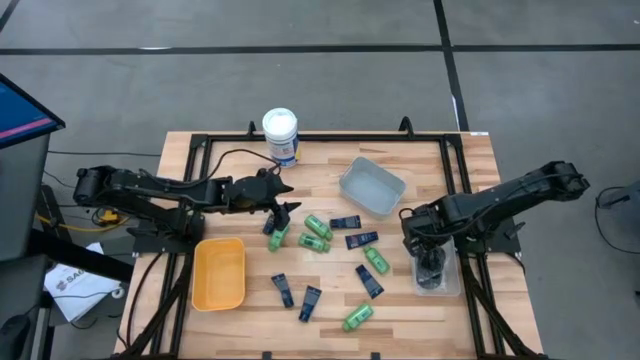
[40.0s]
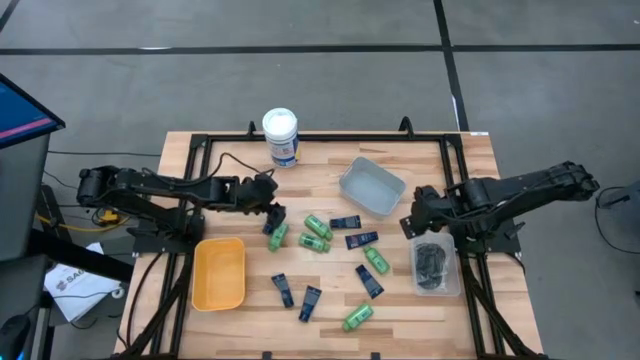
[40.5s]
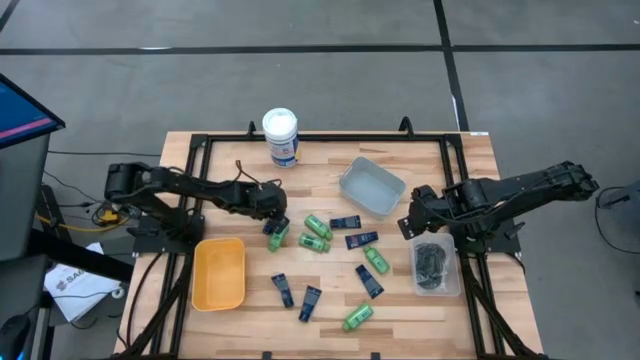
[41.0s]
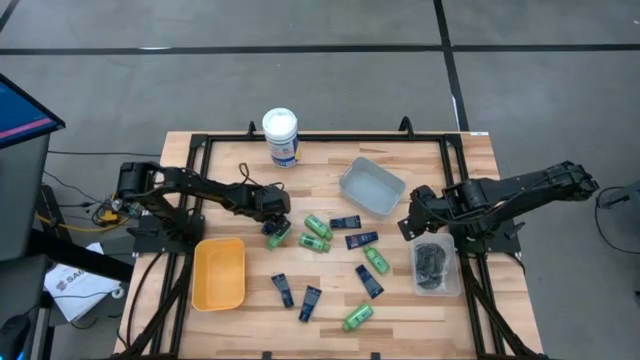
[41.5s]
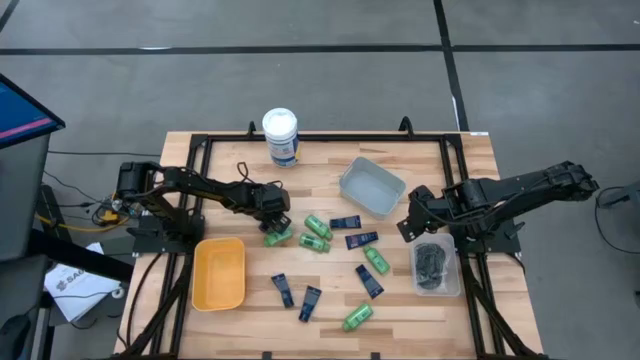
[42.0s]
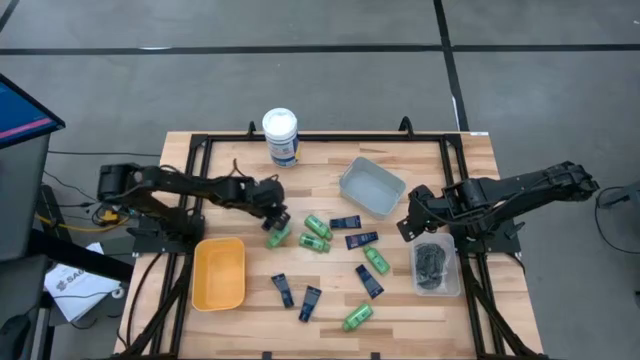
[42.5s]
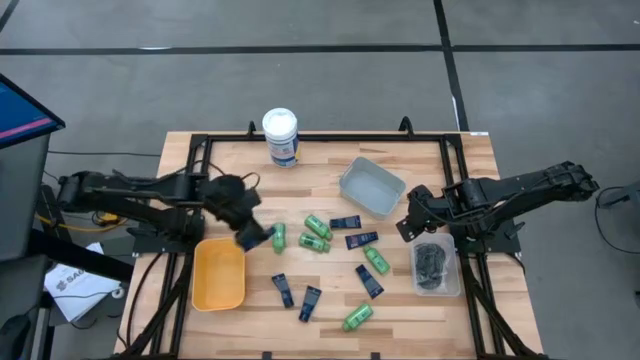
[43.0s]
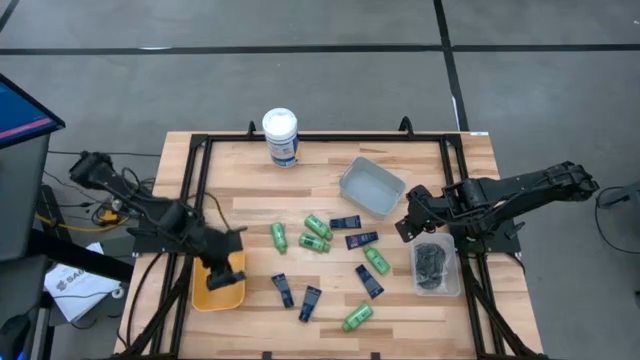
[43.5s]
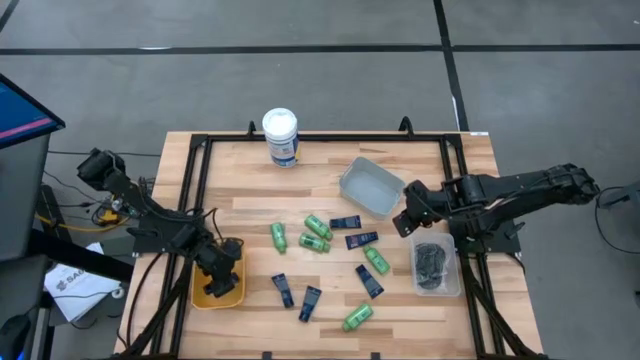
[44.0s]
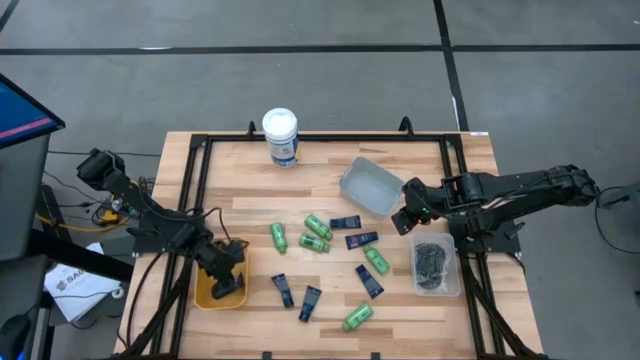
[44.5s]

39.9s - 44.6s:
Task: Pick & Place Travel size toiletries
Put the blue shave cream into the light orange bin

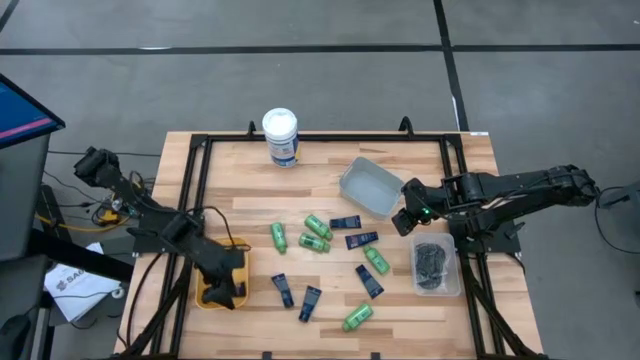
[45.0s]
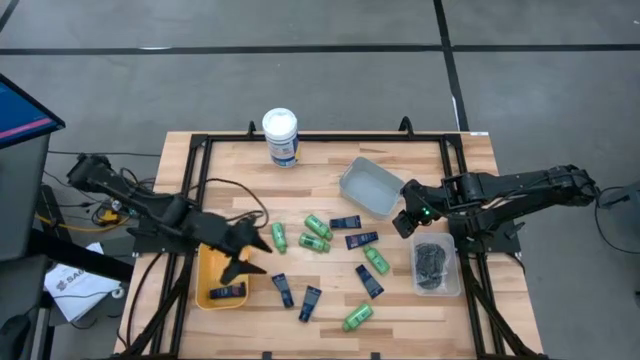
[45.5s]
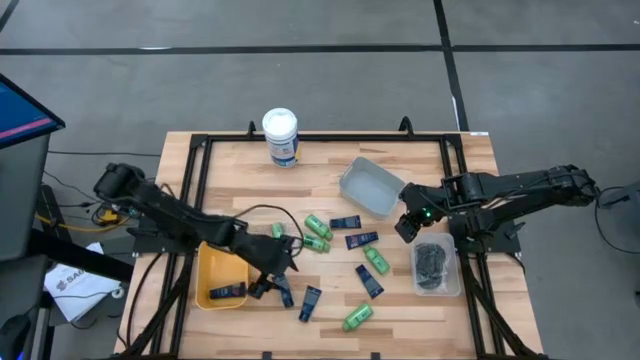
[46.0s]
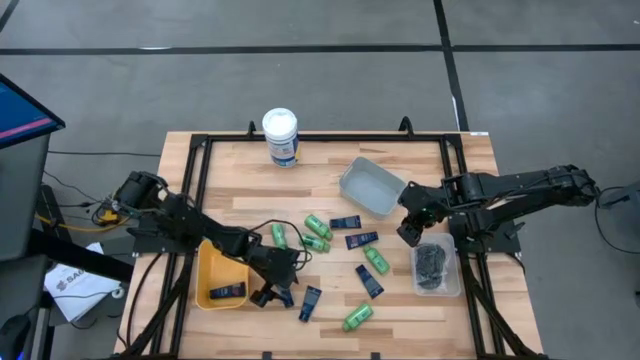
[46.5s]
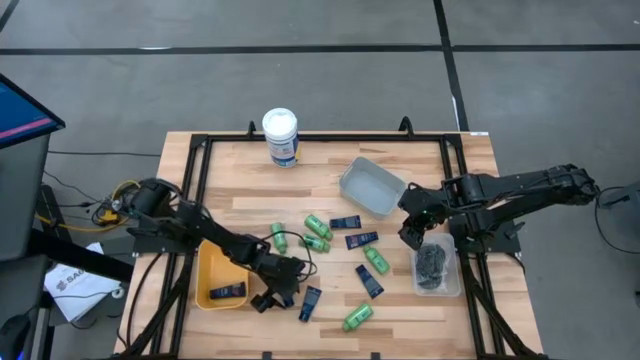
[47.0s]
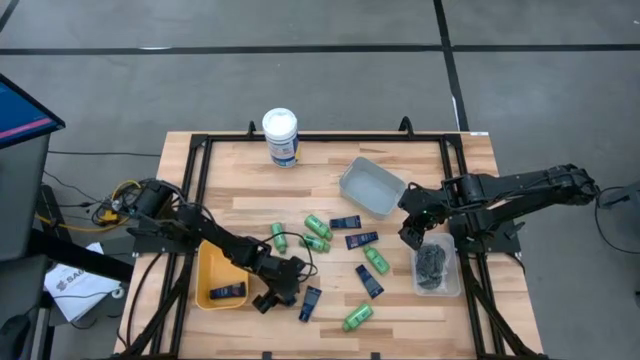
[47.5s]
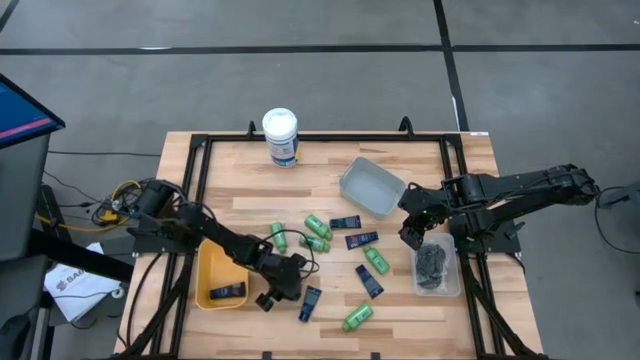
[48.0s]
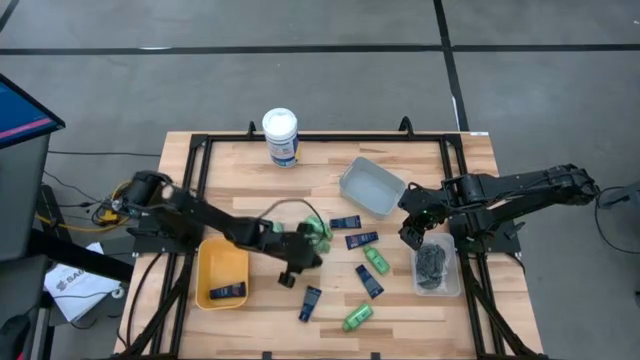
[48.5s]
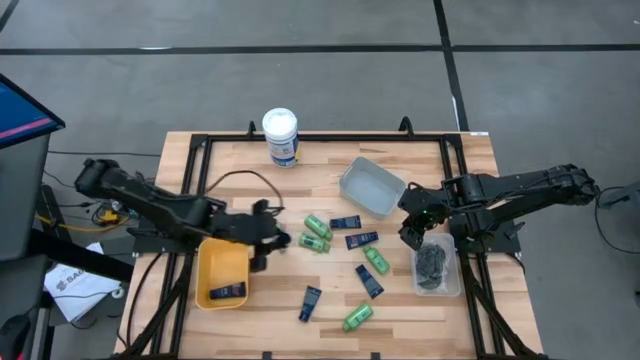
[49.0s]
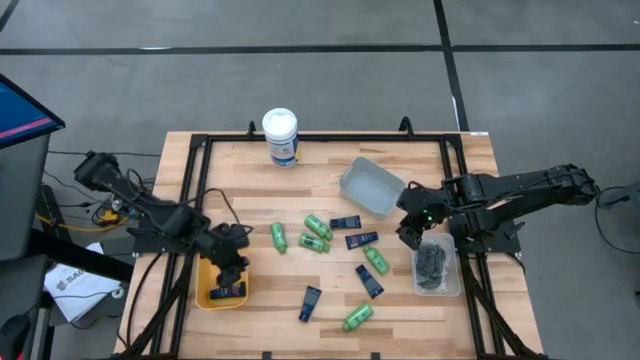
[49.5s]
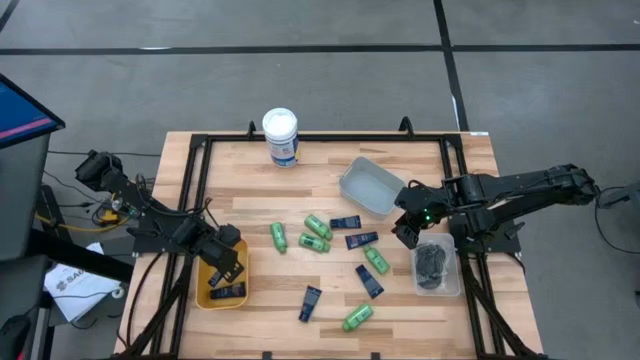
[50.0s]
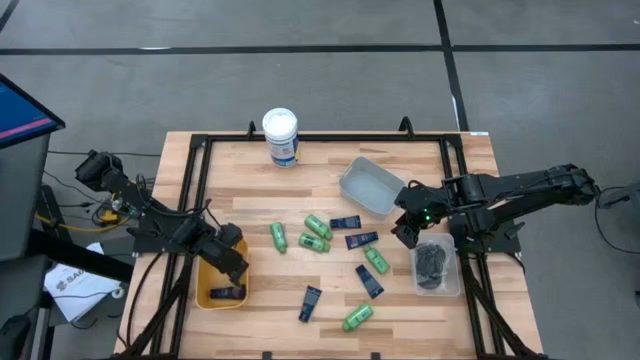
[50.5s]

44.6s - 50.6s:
Put the blue shave cream into the light orange bin

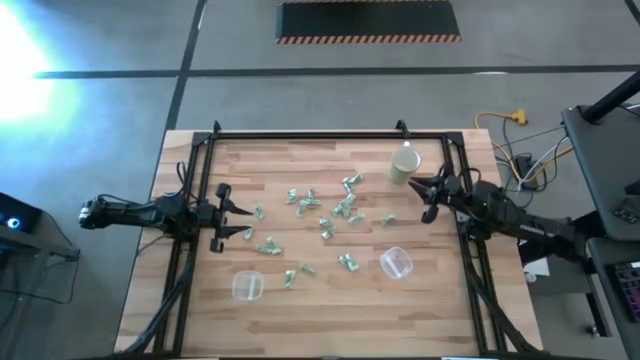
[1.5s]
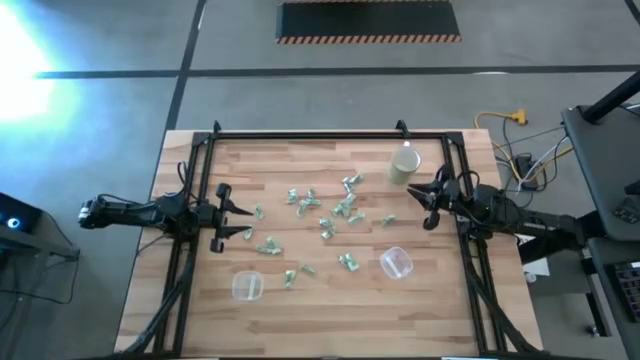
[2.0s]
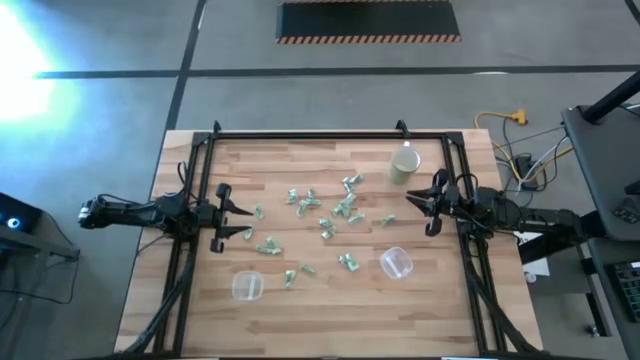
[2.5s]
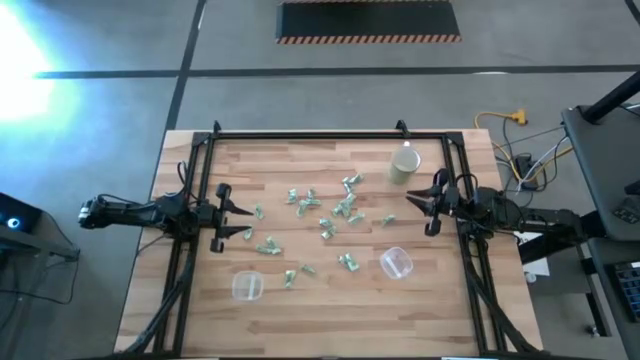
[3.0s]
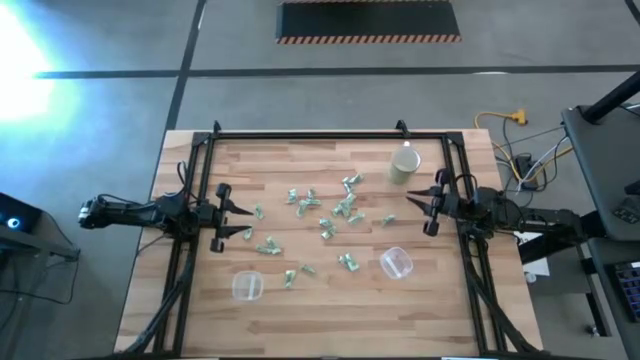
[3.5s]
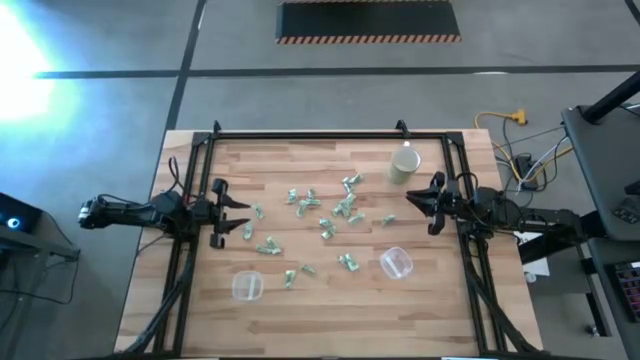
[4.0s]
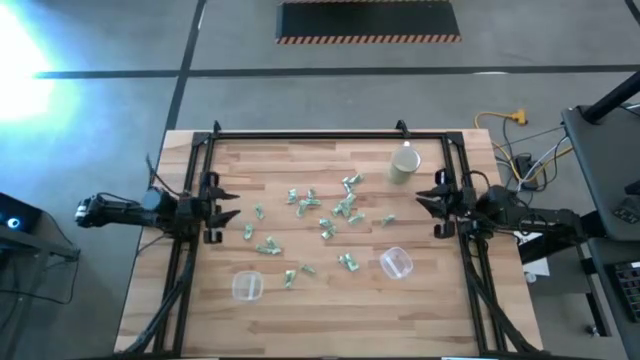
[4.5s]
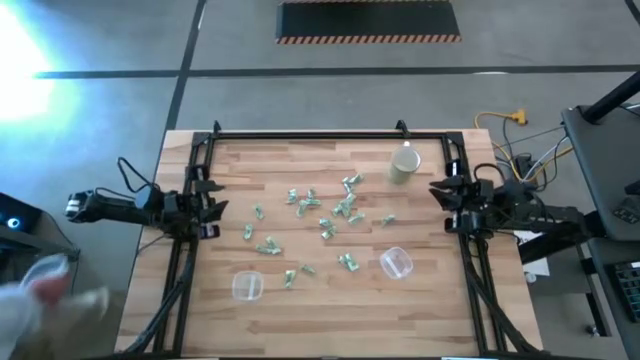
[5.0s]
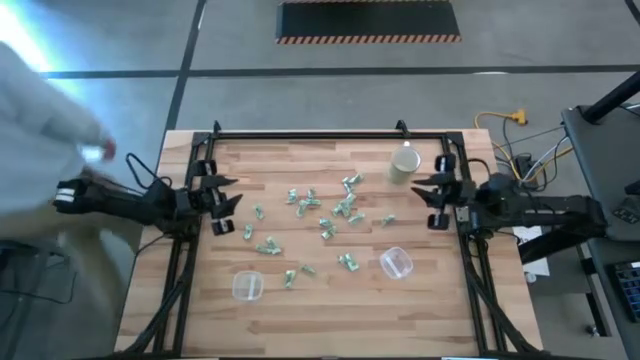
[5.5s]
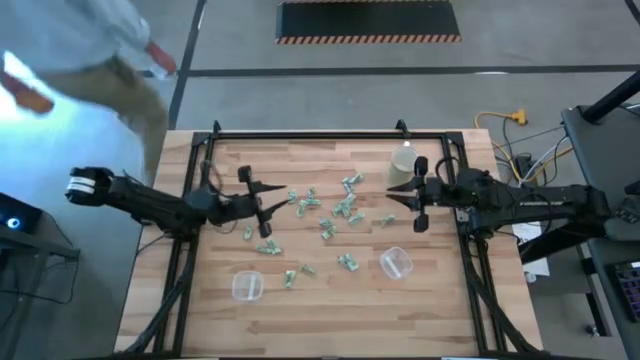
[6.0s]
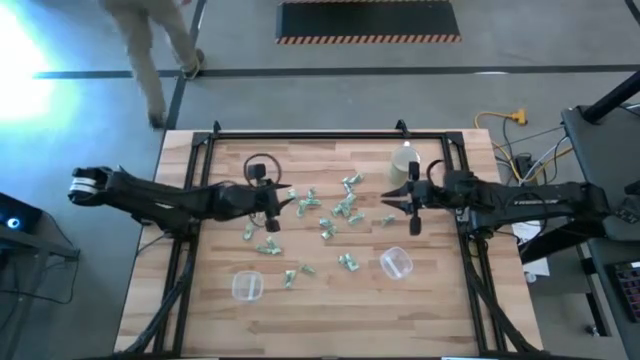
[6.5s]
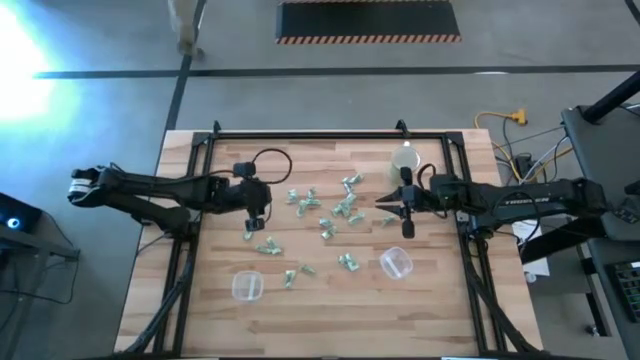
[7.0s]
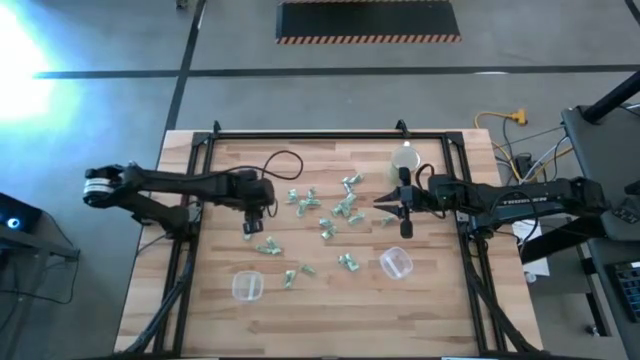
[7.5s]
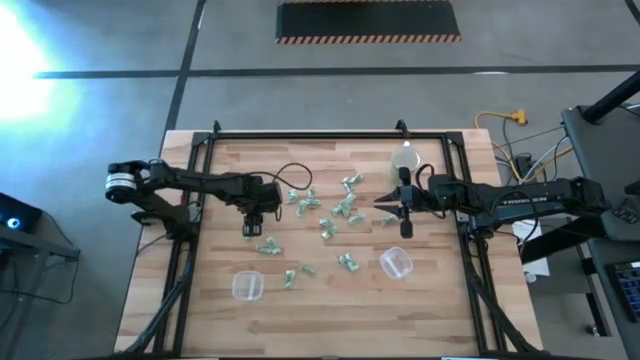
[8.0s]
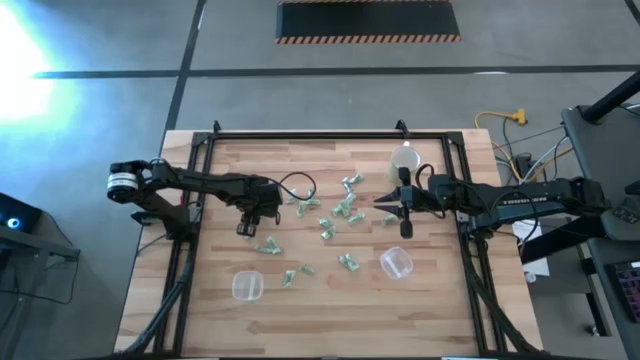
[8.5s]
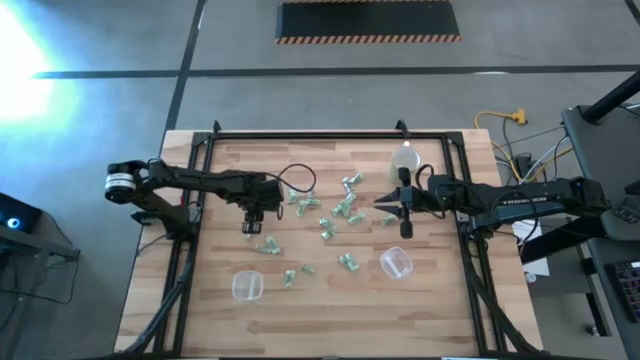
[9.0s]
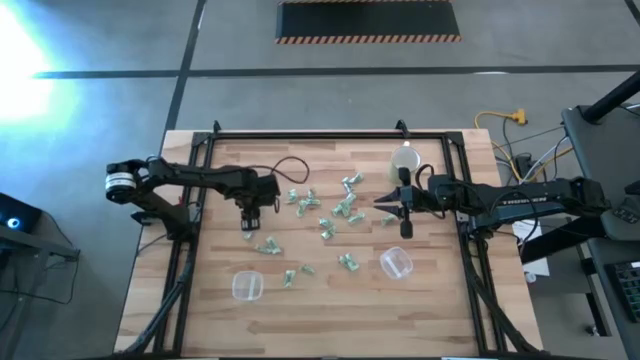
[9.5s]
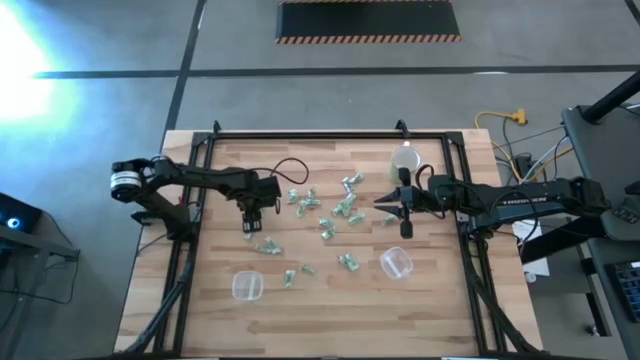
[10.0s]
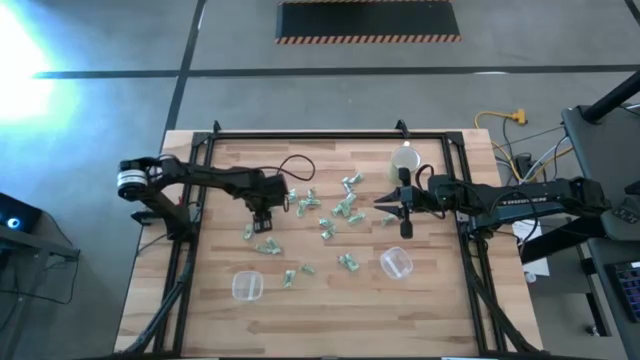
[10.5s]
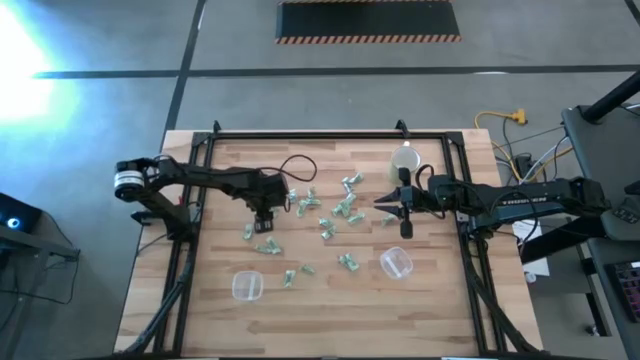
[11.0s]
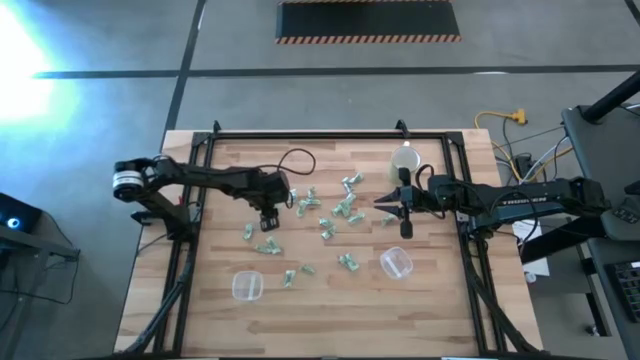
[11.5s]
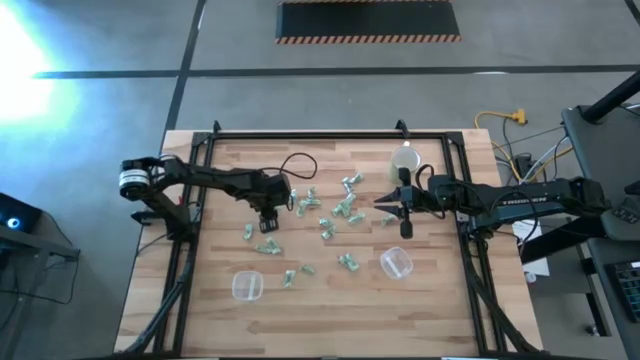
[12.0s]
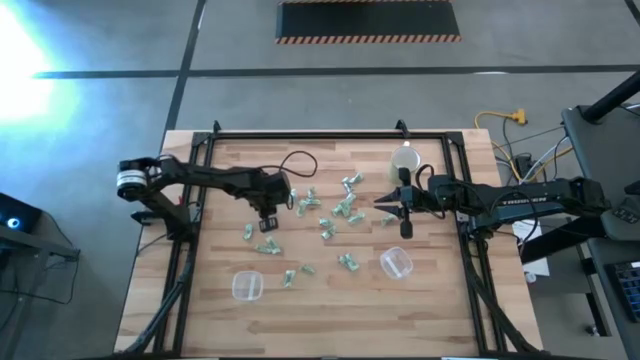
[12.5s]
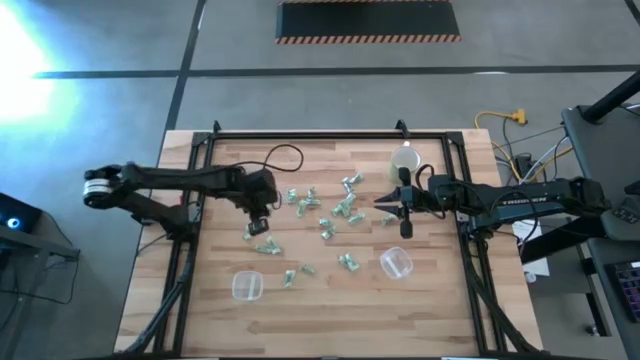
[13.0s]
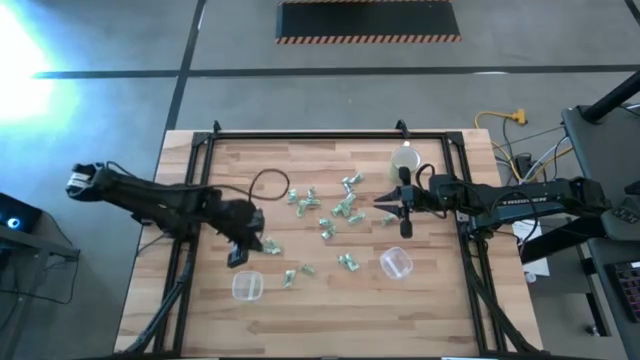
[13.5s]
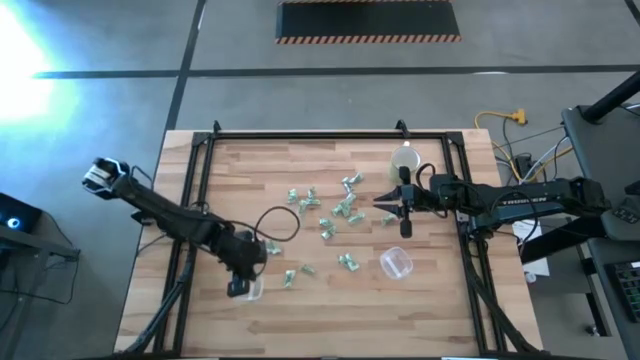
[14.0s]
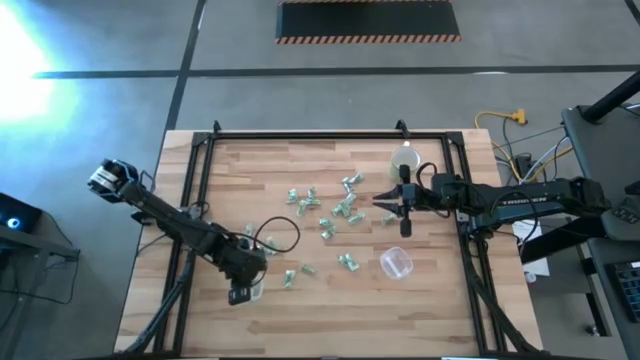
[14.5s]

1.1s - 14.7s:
Task: Pick and place Stevia / Truvia into bins
Put the stevia packet into the left transparent container
